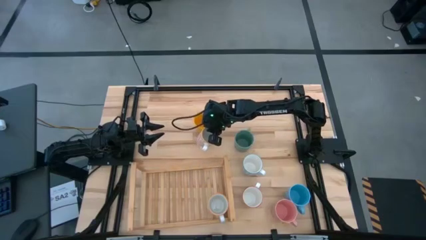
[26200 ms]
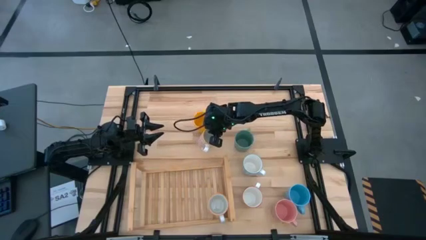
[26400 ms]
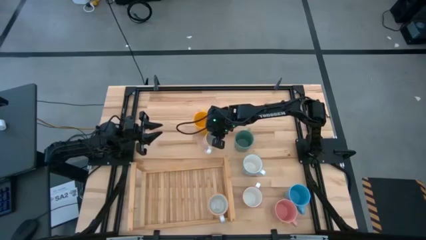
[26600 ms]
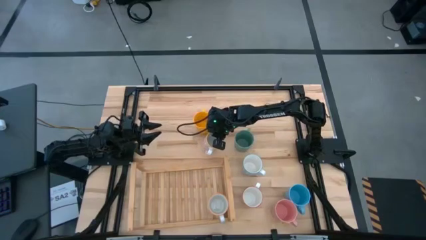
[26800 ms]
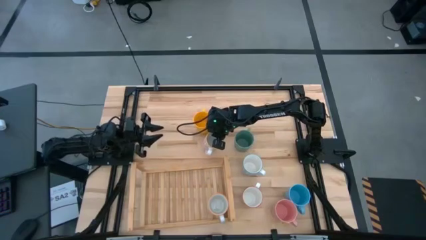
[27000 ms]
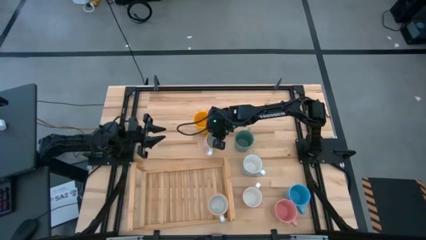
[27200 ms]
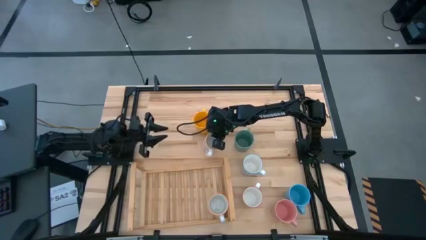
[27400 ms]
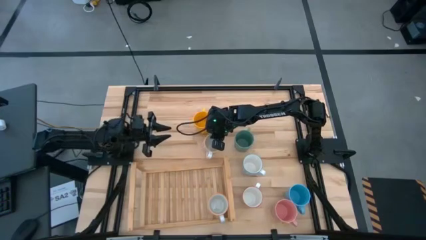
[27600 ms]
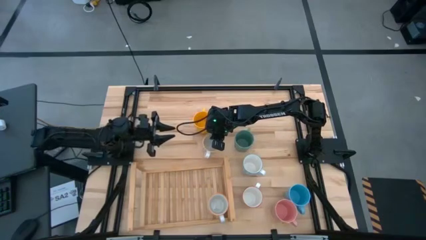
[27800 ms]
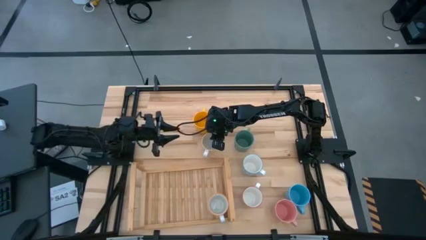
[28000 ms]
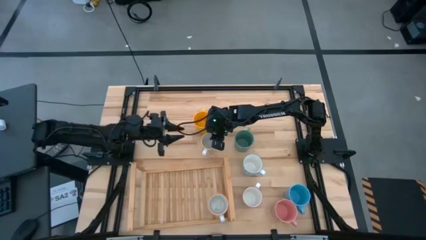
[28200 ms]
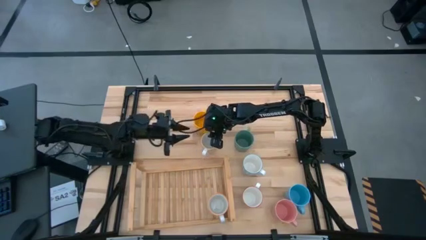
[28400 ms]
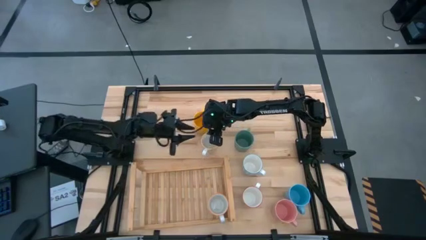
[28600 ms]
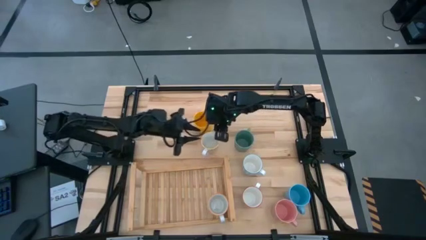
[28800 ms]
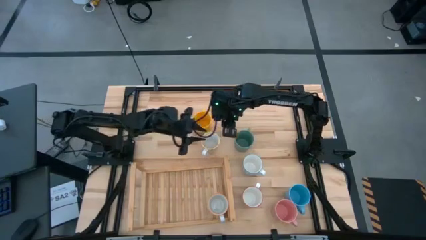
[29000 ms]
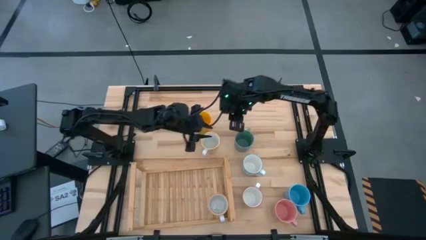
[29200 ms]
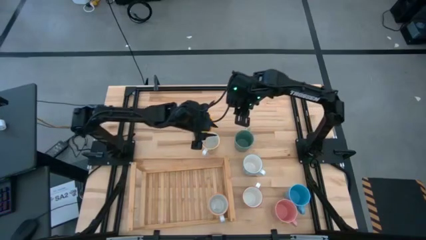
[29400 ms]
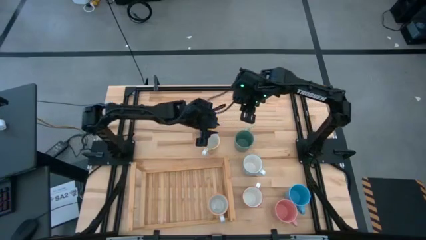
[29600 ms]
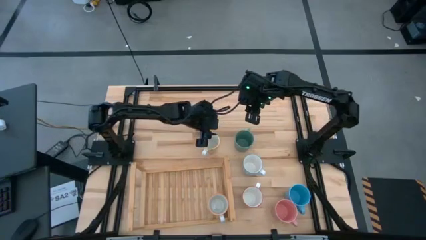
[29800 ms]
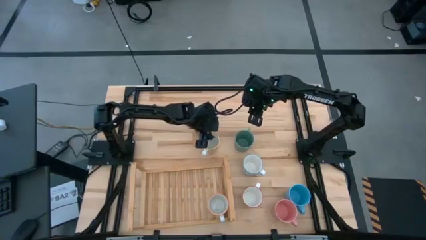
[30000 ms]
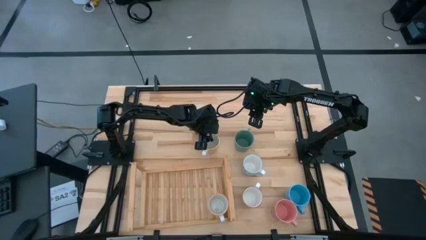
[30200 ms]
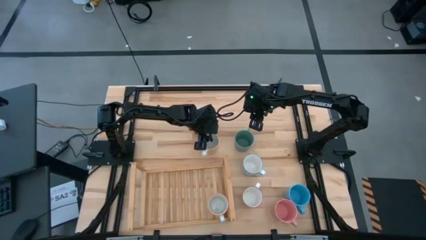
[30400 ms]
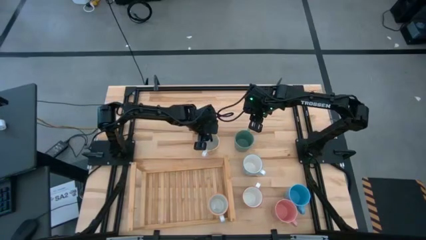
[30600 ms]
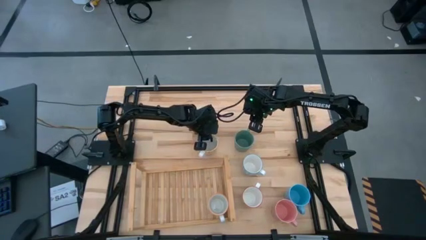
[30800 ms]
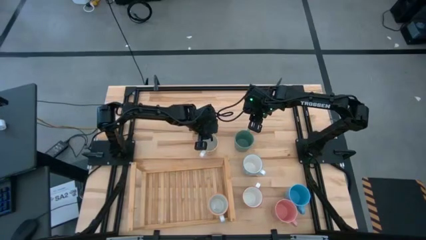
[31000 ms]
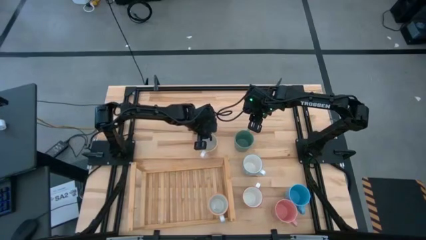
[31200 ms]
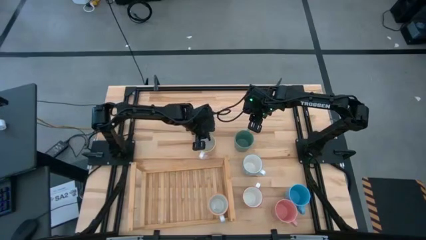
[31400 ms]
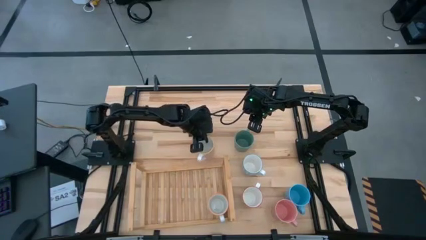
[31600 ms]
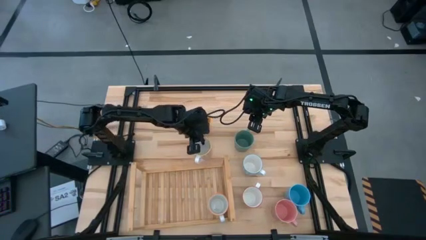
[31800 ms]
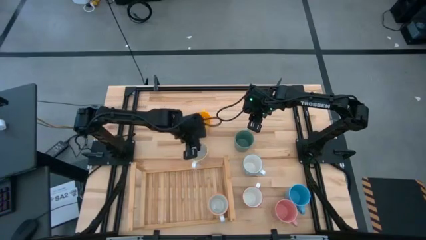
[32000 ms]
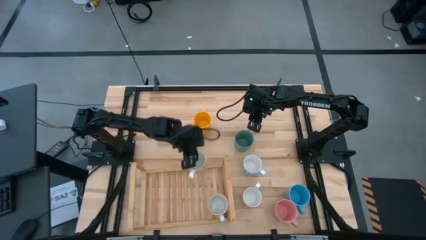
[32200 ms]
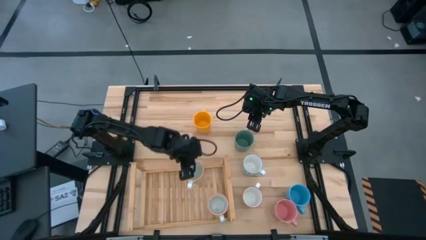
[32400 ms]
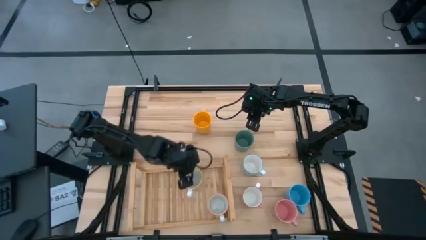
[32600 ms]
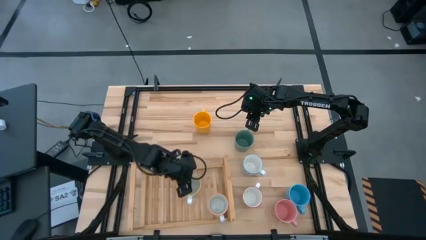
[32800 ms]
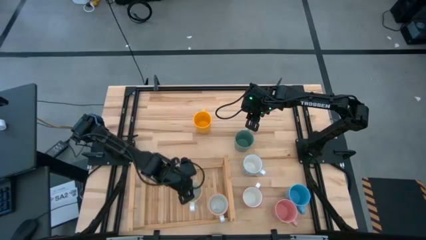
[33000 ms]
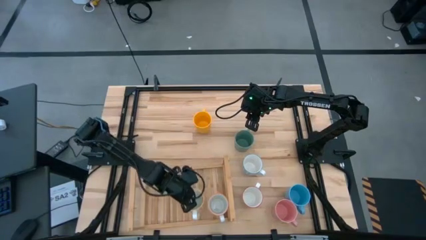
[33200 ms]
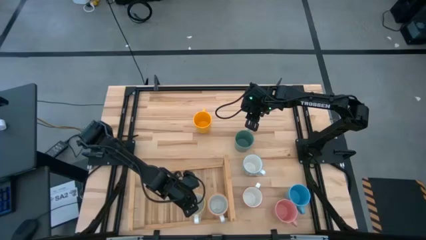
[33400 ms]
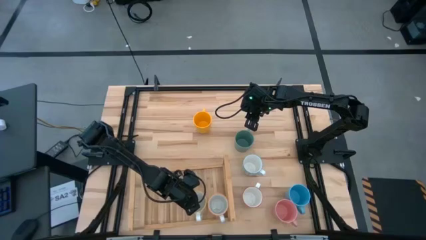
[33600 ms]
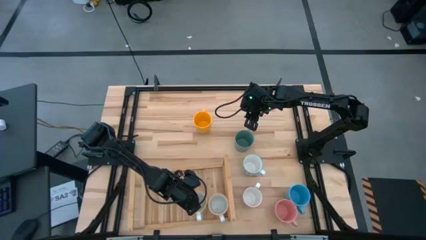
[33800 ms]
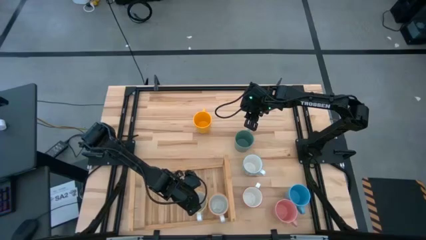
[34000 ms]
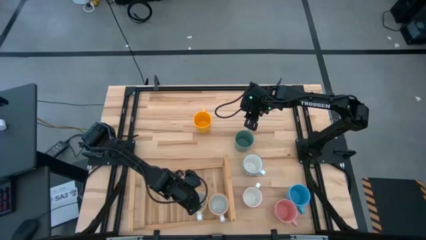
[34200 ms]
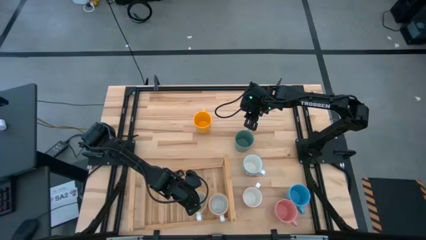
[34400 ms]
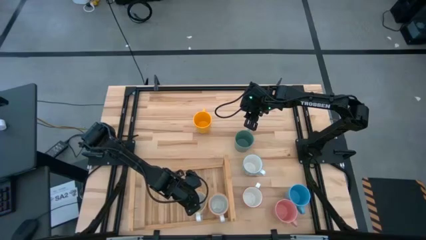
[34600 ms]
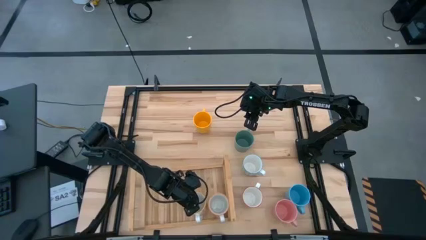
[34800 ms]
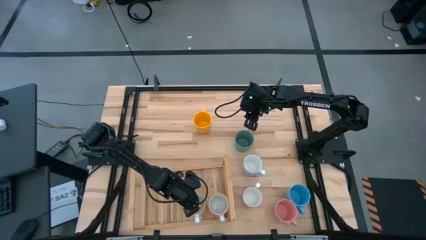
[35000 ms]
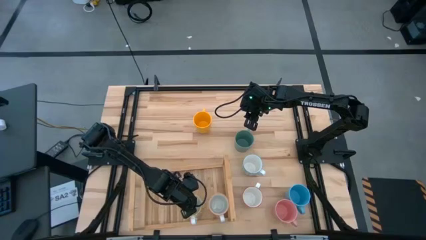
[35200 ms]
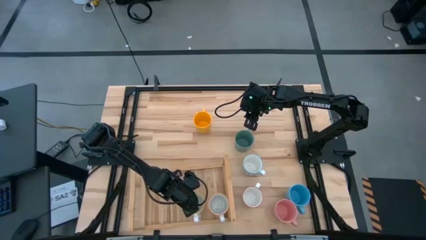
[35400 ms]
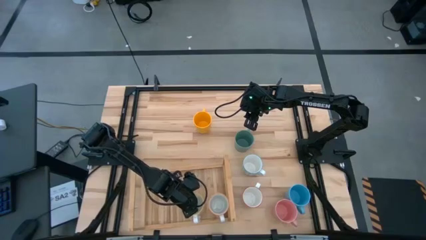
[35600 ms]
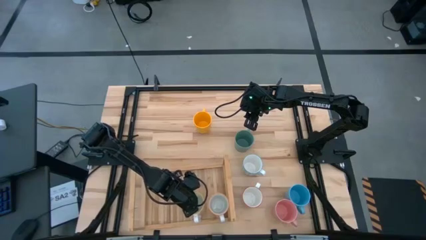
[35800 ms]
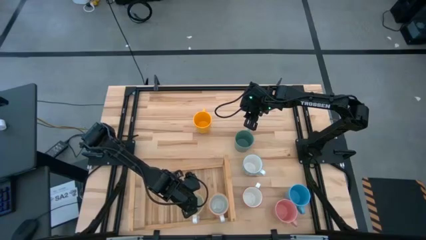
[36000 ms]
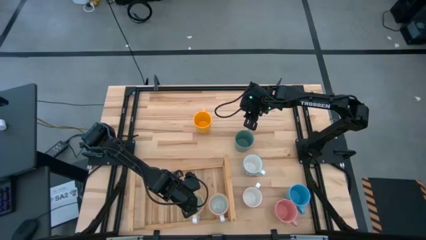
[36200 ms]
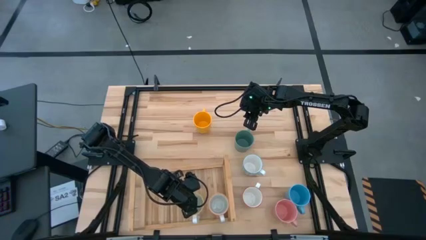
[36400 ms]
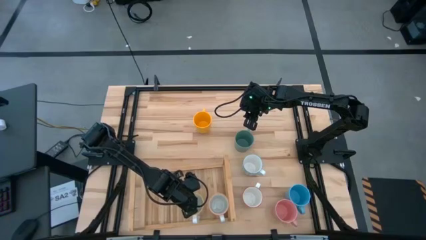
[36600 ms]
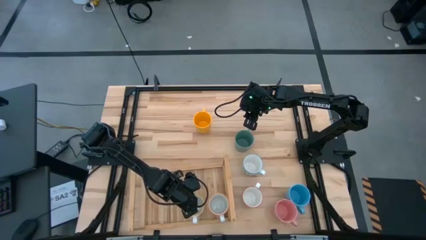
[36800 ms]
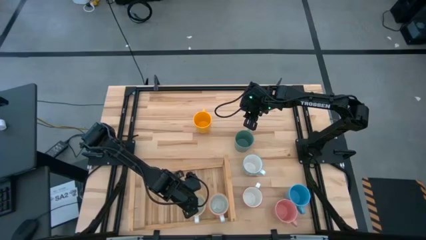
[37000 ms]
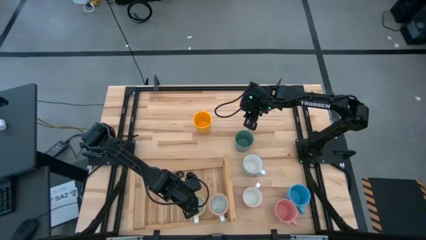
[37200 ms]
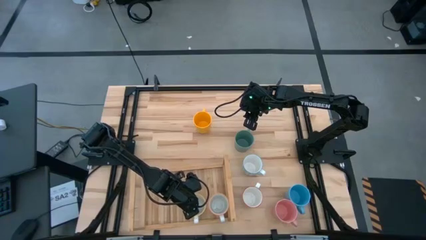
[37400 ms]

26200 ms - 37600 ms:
Task: Place coffee mugs
Put the orange mug on the shelf
